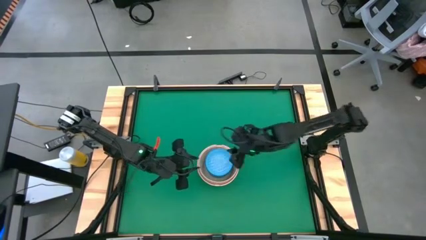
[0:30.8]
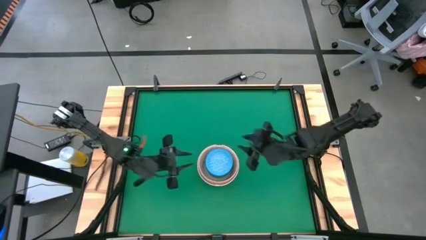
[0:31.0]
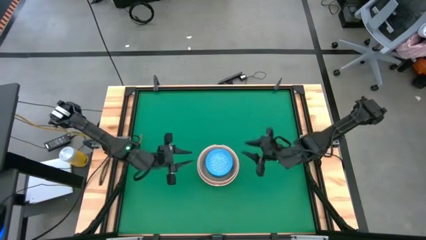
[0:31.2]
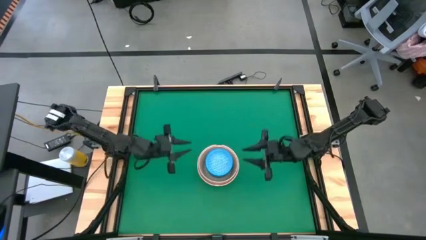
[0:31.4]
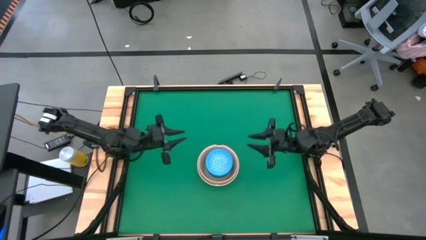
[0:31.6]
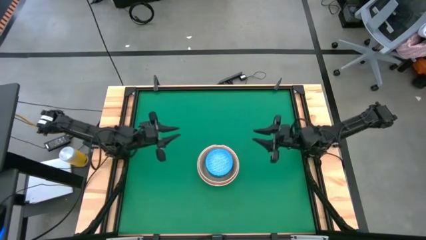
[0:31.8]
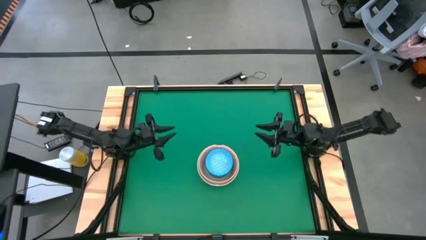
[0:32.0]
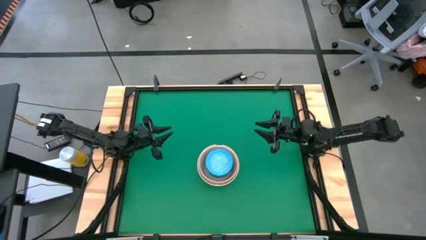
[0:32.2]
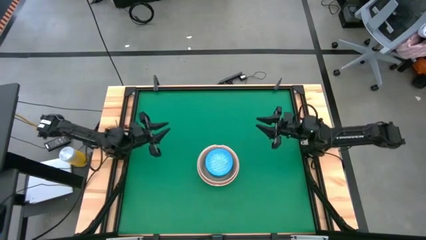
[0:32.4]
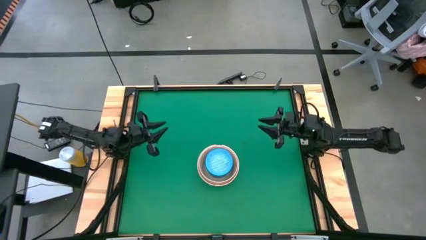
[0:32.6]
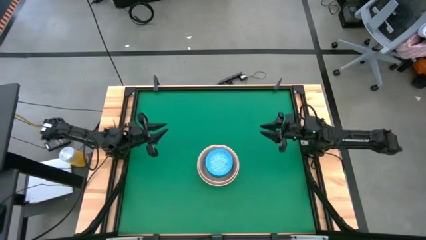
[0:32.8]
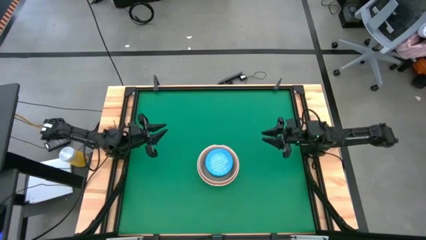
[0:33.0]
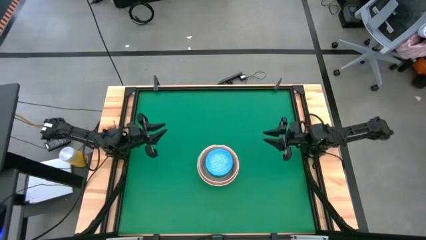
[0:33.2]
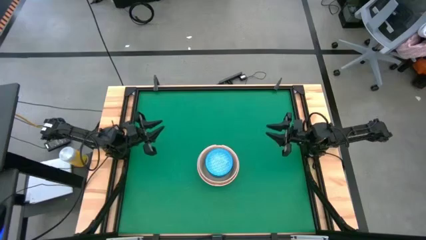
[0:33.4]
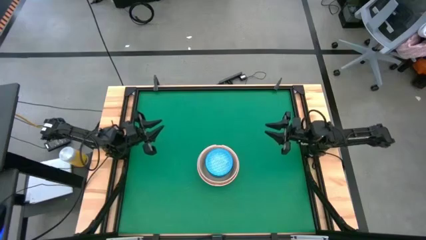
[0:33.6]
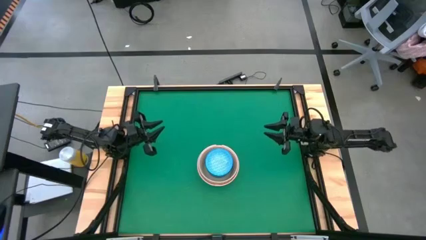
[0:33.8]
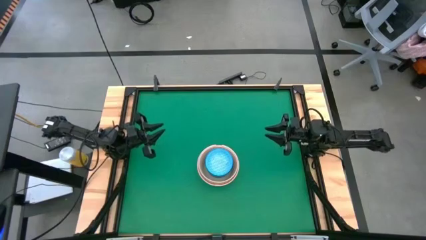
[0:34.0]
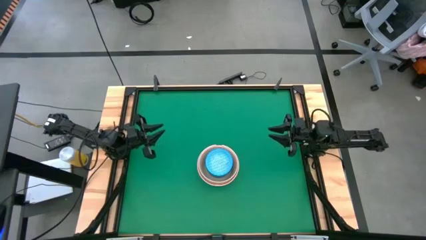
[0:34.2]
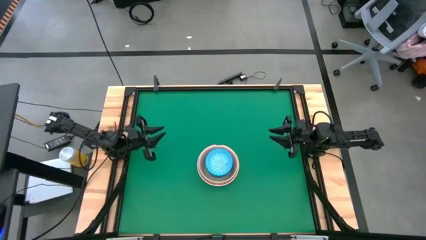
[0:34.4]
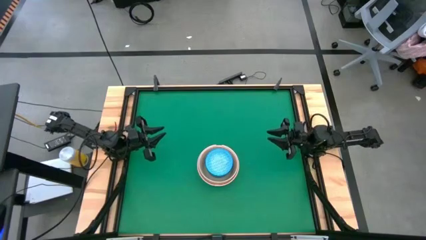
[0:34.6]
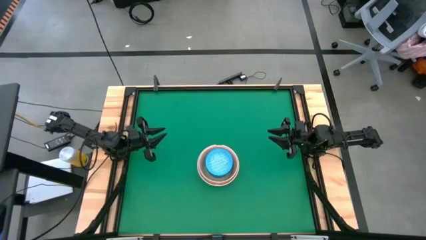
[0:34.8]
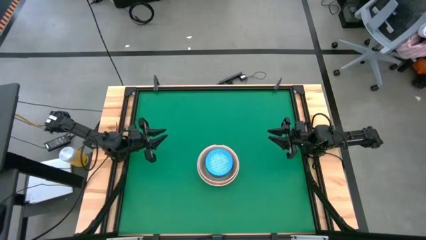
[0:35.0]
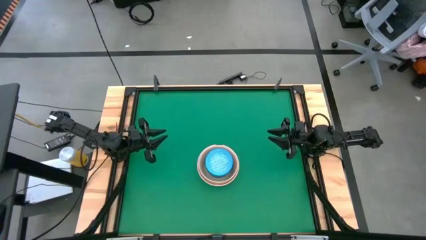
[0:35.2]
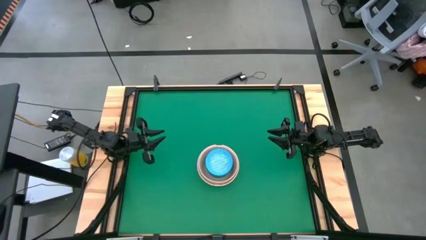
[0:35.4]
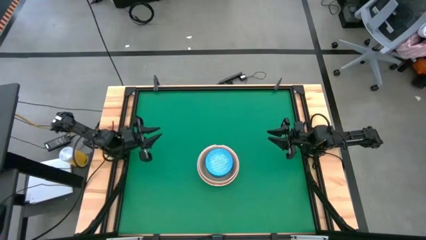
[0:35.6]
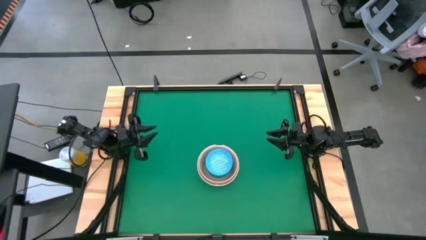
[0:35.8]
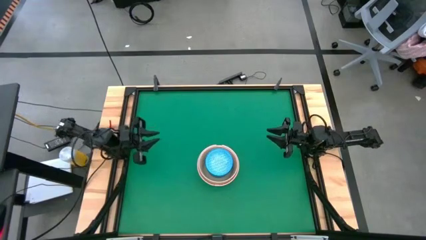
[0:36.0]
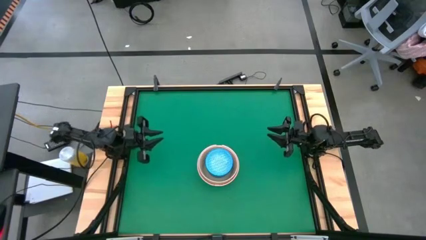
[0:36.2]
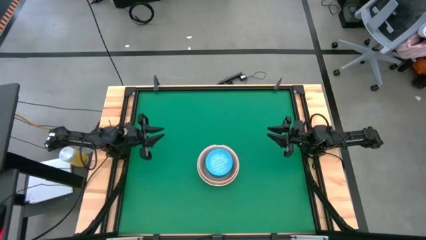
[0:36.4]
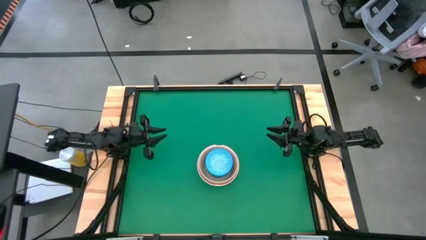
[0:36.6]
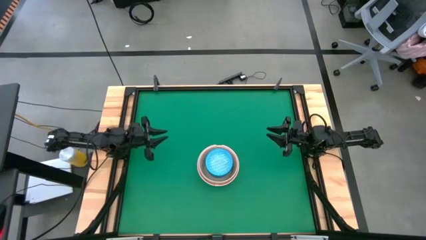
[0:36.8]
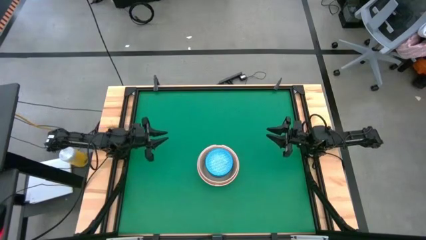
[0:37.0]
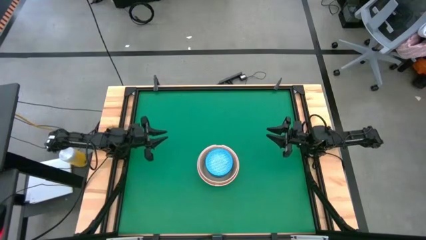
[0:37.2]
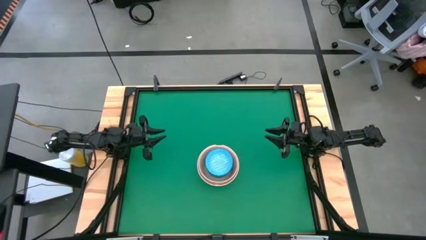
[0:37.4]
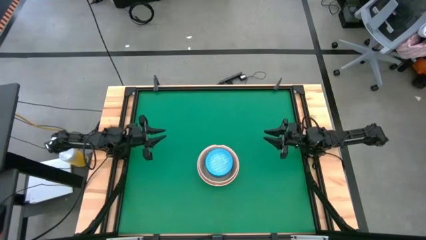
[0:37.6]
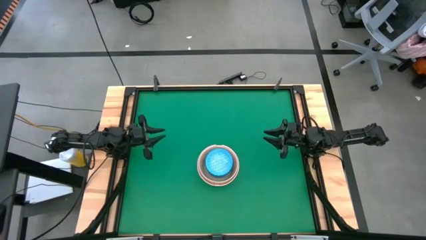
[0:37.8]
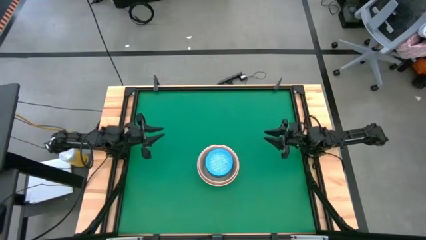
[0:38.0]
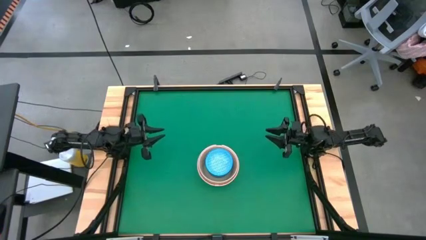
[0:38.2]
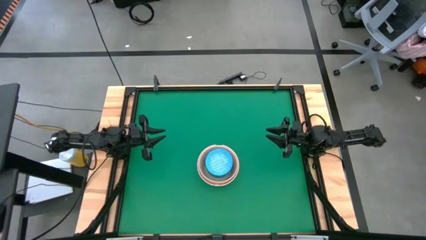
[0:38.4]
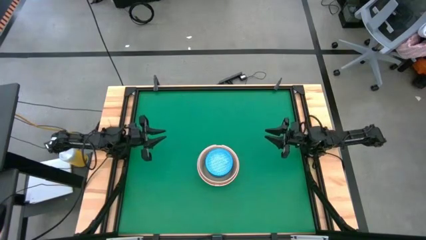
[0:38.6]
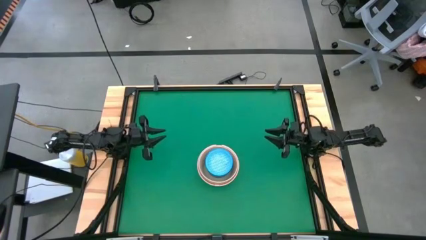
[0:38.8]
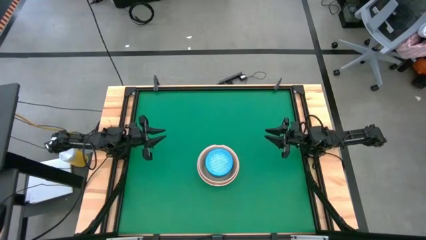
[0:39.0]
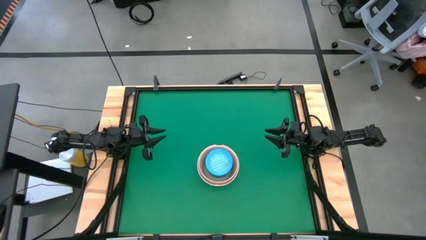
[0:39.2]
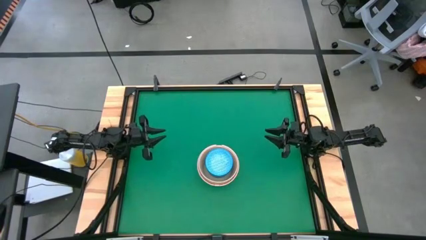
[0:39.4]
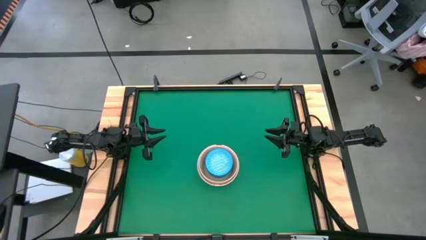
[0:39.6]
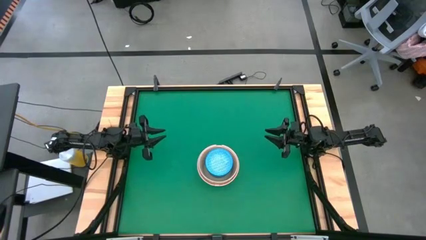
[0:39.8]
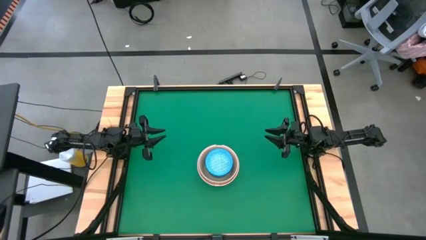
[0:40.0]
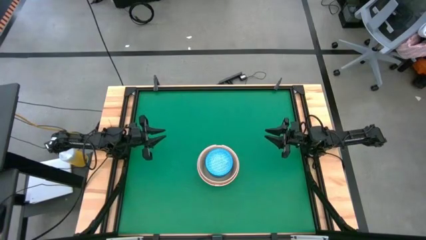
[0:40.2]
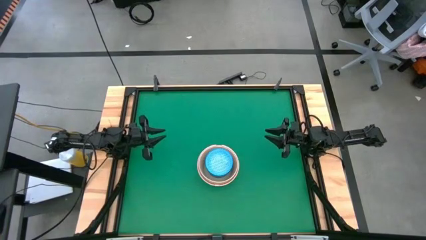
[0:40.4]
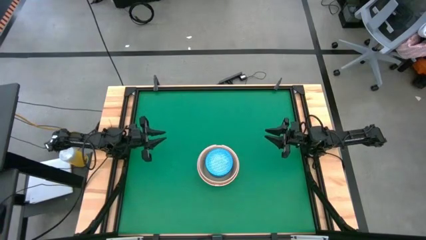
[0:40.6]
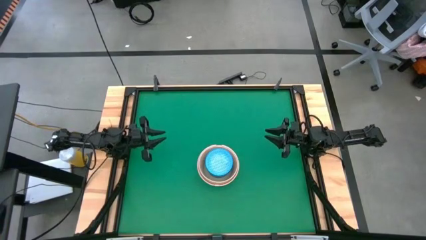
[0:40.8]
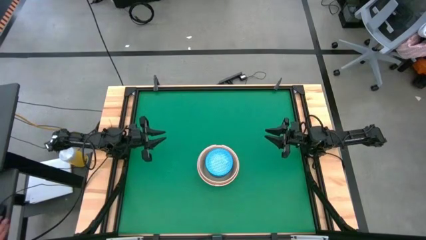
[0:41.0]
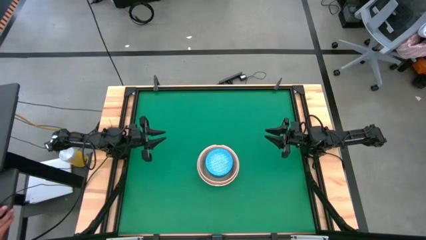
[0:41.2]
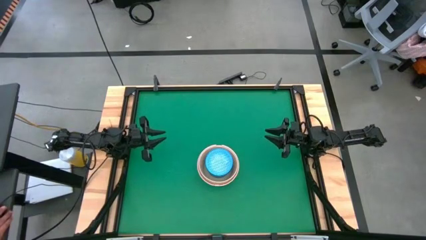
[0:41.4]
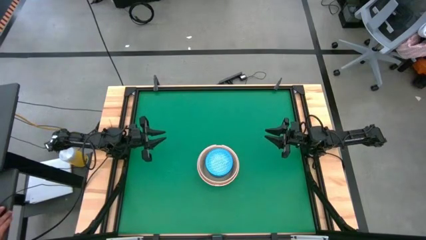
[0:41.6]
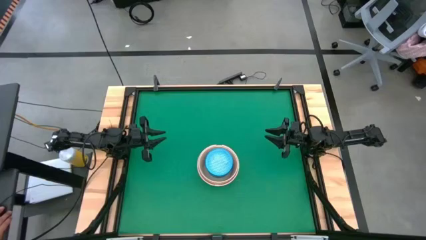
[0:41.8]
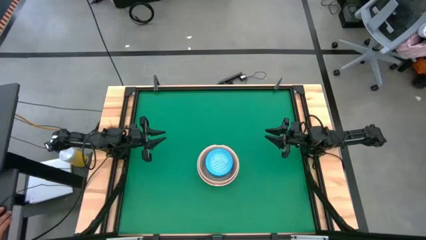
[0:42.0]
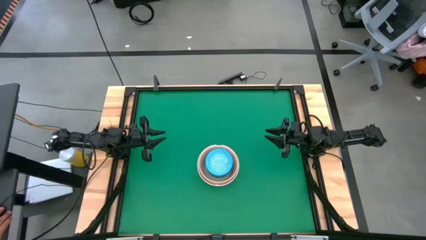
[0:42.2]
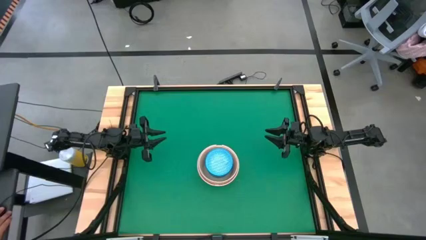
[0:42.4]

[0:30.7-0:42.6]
Return to Home Position

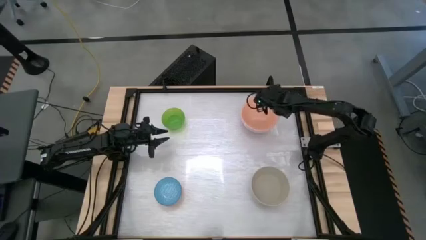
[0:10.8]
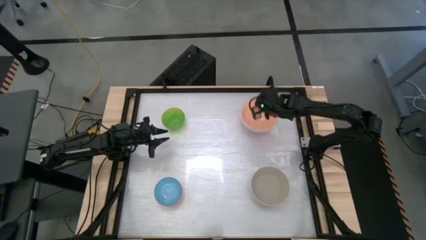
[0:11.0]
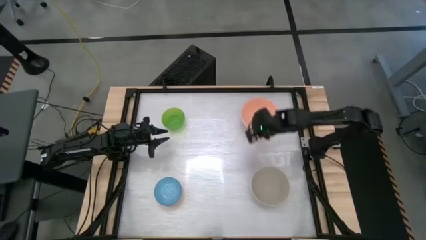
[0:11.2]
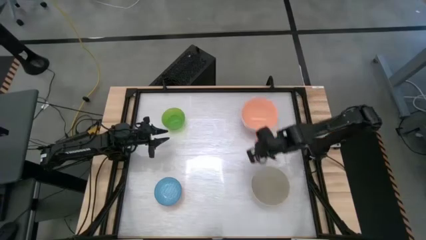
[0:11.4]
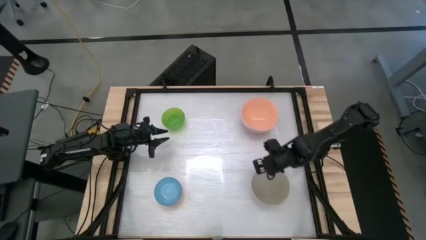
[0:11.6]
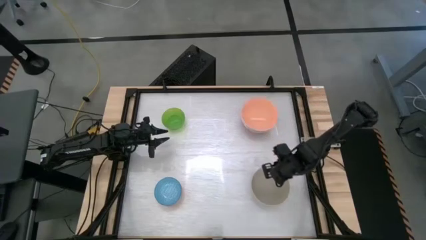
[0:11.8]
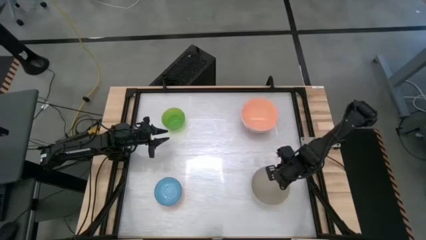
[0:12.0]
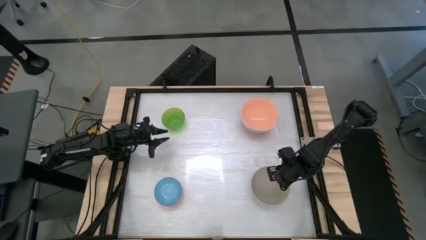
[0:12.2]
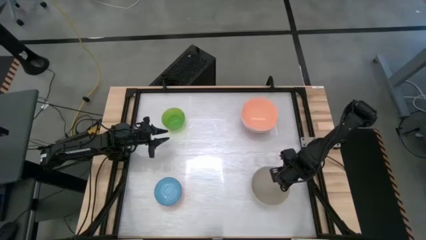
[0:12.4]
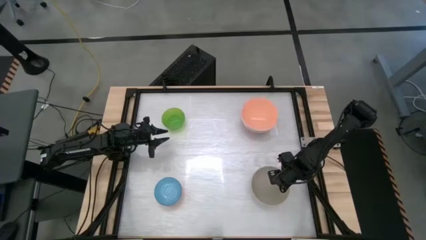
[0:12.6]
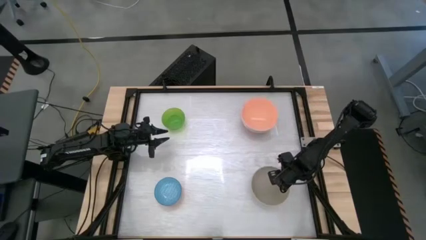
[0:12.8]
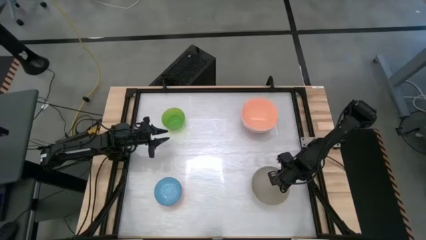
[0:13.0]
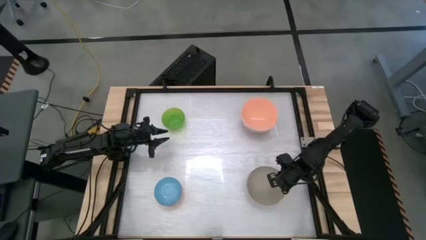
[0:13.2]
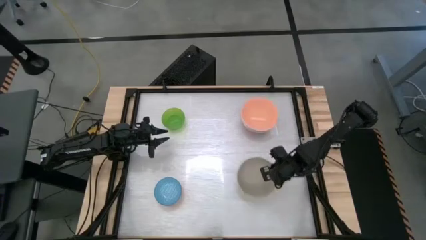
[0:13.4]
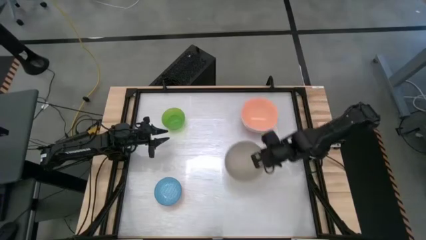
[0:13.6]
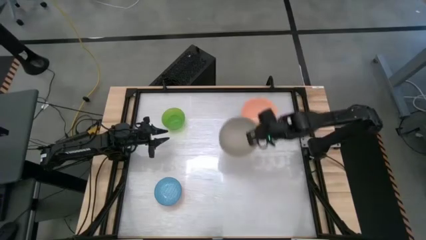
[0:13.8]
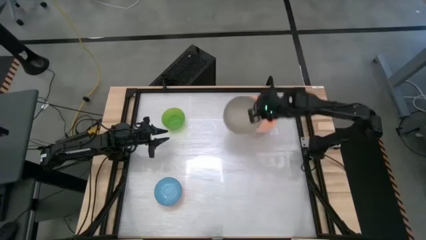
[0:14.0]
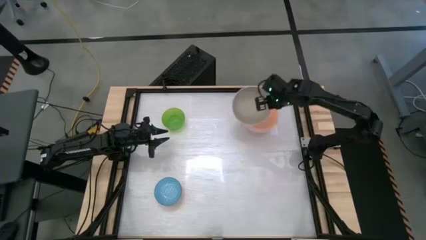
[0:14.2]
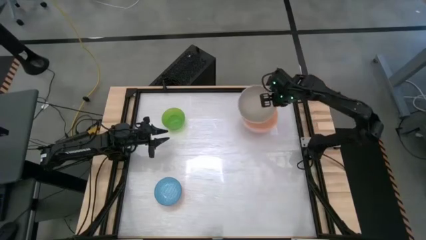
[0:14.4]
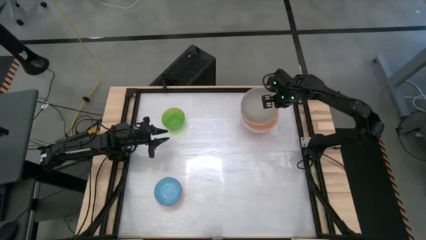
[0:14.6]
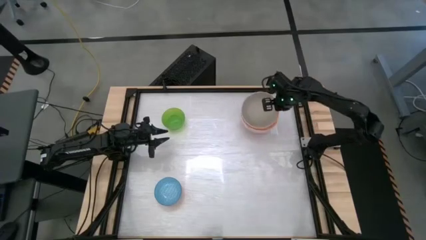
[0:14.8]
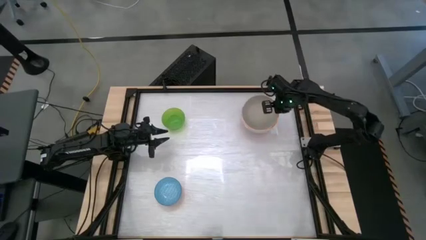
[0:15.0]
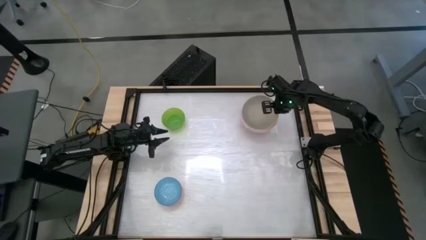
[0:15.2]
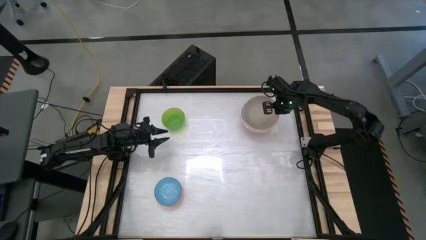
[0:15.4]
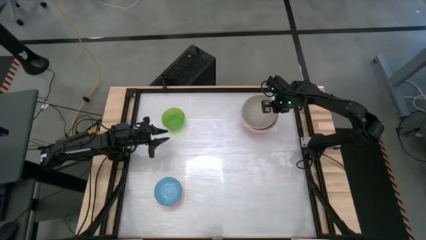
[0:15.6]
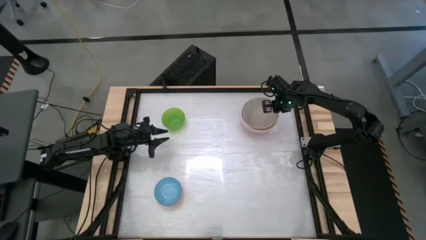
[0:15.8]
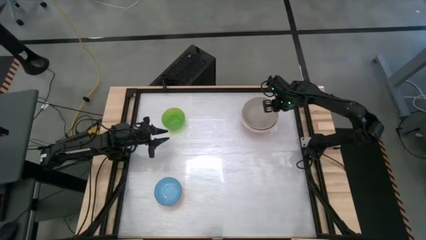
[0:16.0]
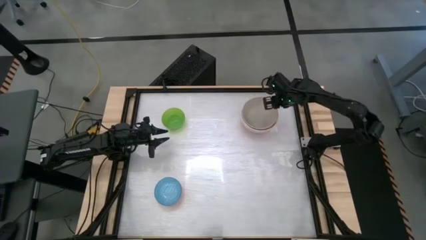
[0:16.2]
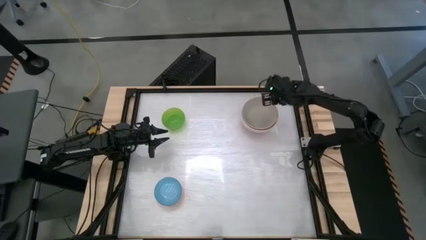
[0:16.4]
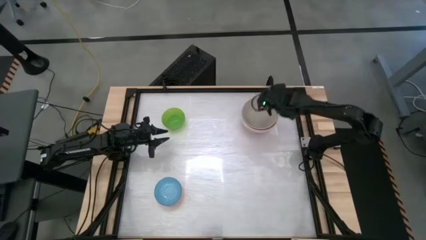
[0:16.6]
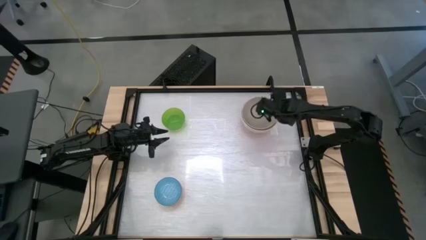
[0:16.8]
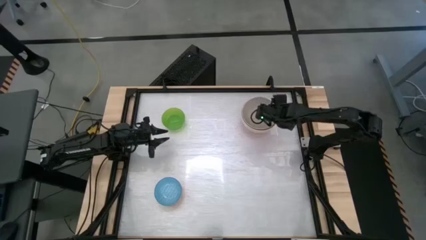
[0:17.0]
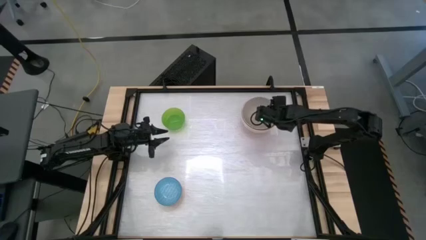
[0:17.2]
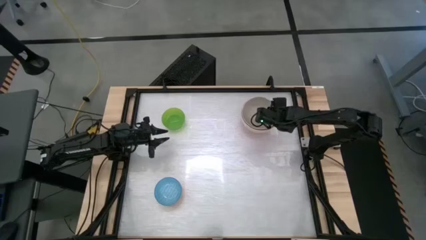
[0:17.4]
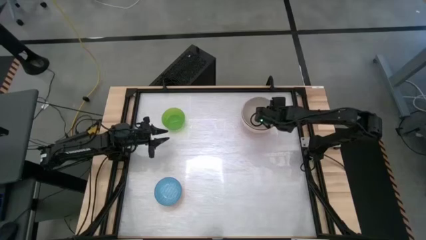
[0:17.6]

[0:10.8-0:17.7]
Stack the gray bowl on top of the orange bowl
